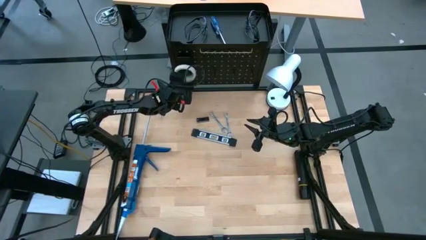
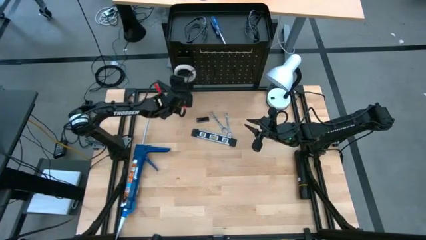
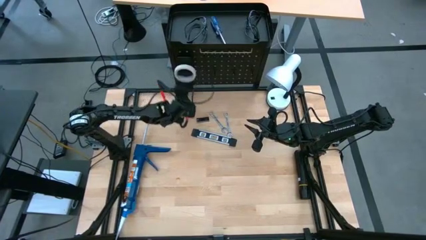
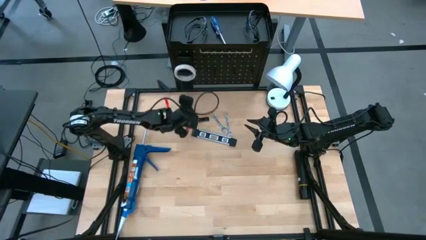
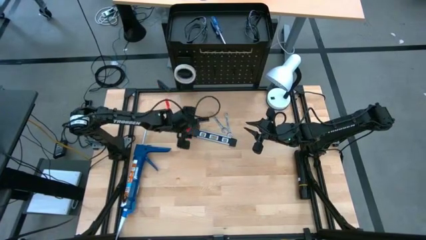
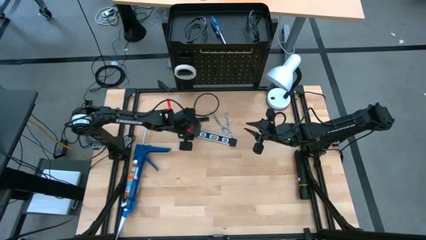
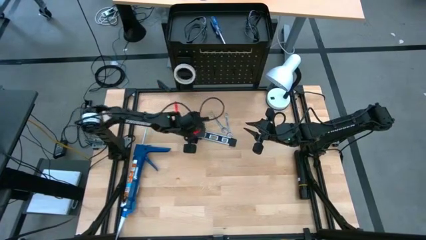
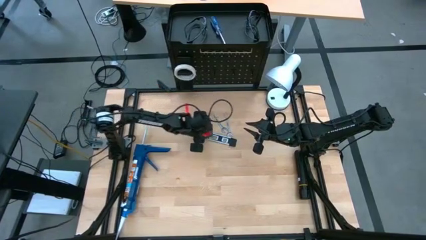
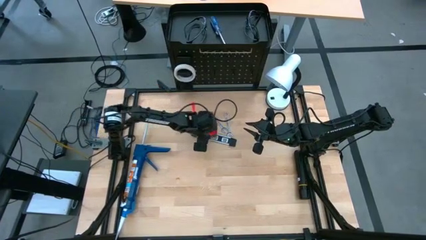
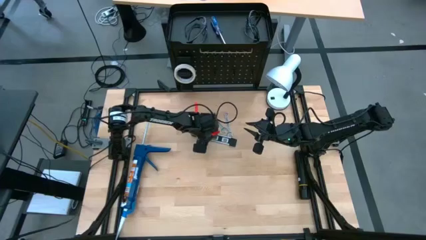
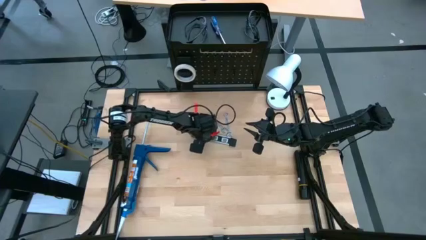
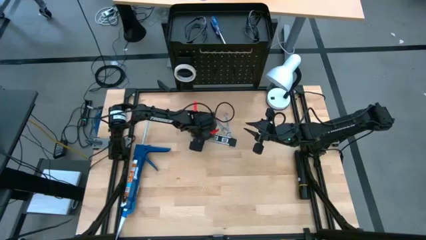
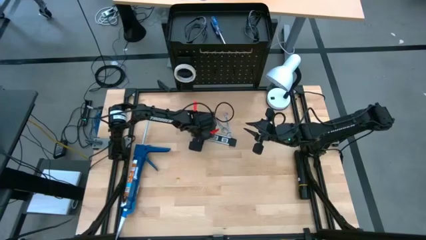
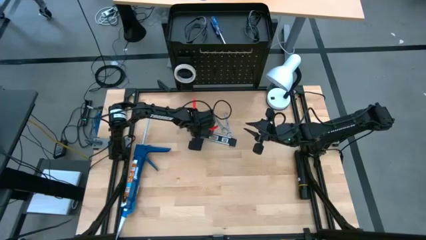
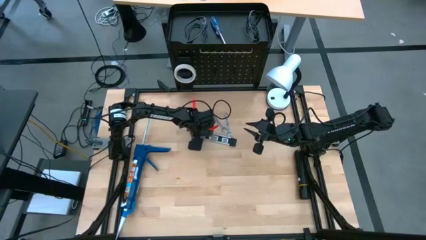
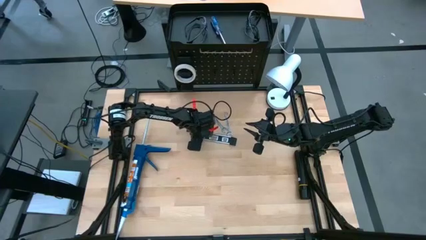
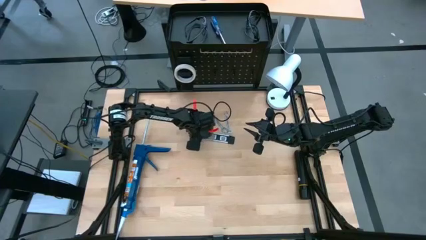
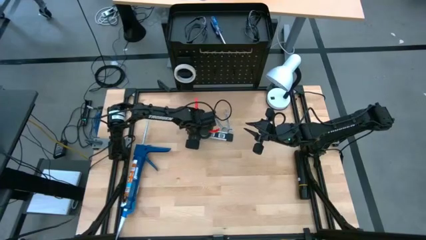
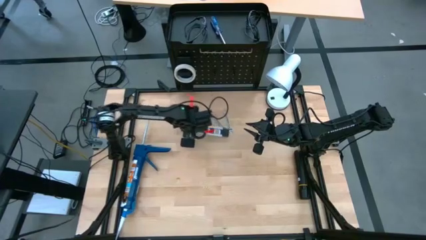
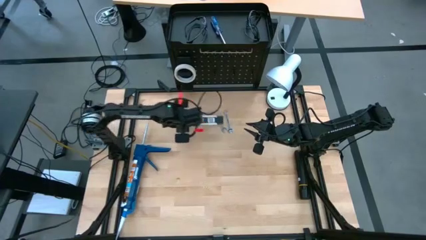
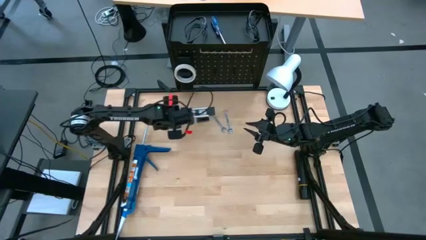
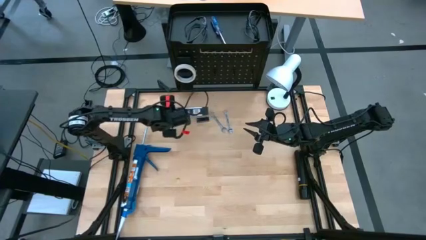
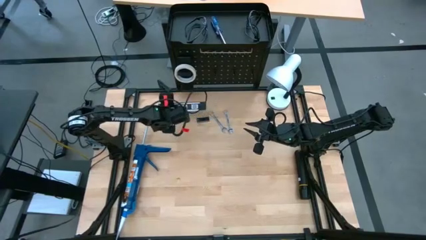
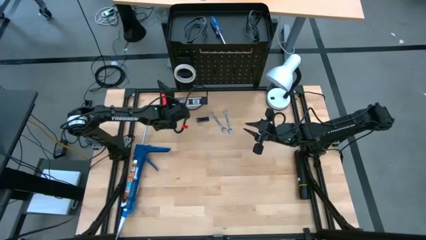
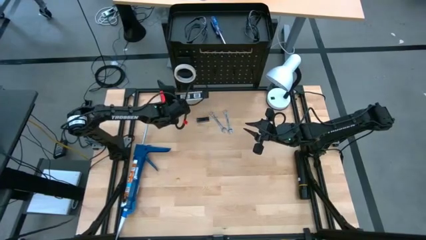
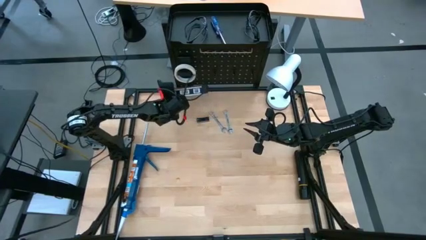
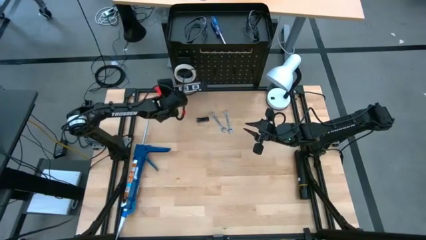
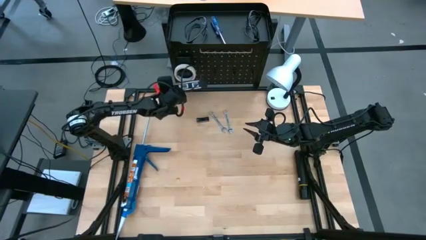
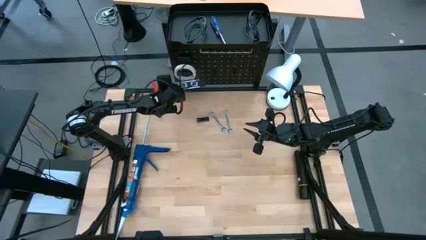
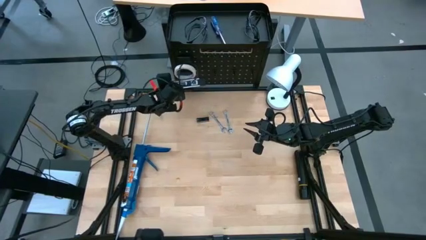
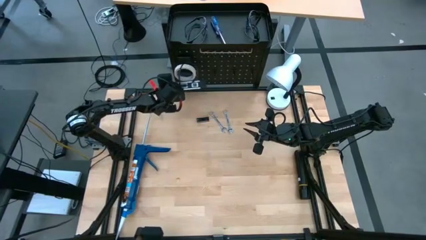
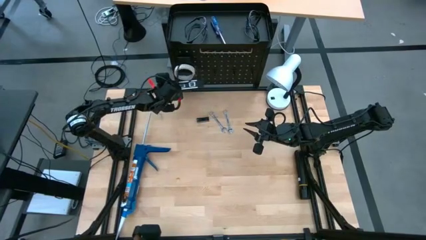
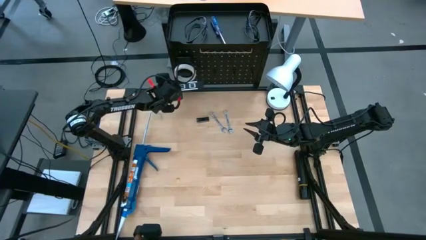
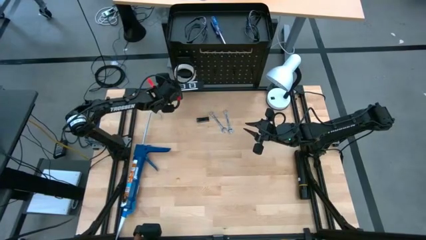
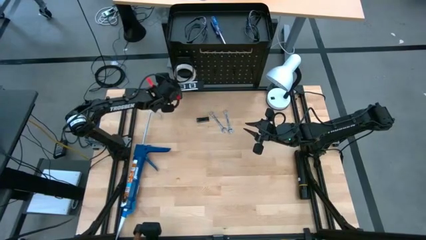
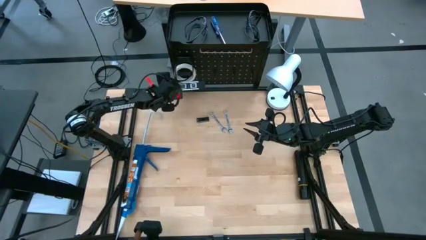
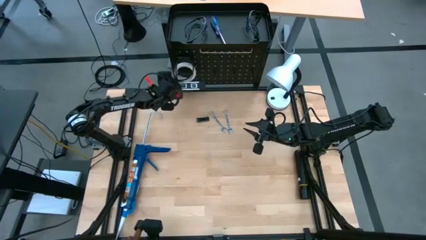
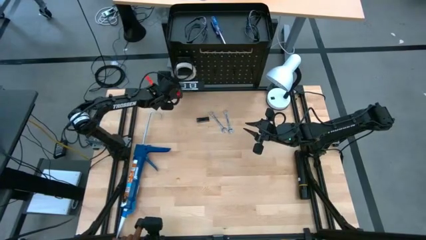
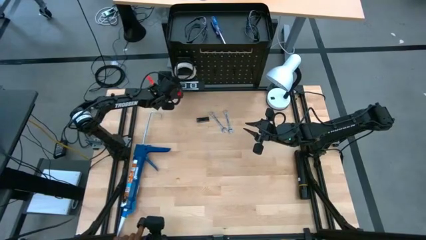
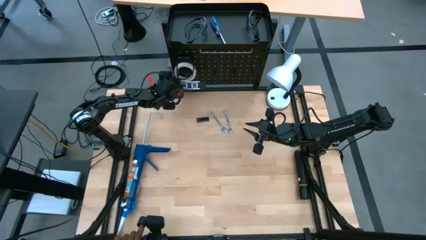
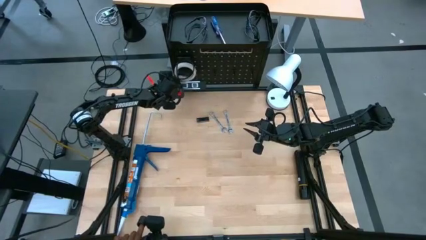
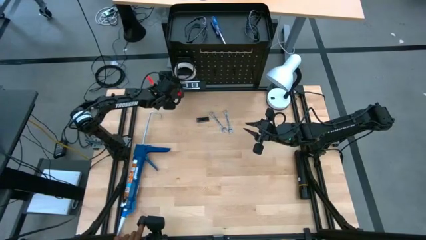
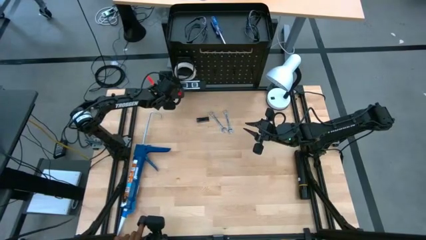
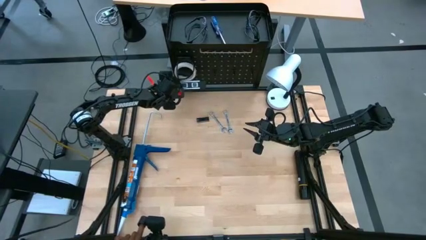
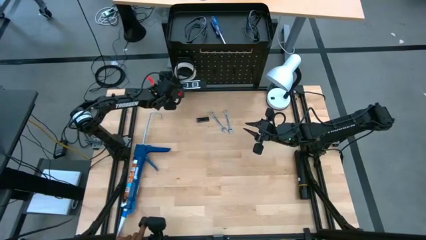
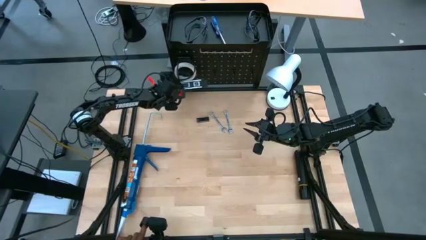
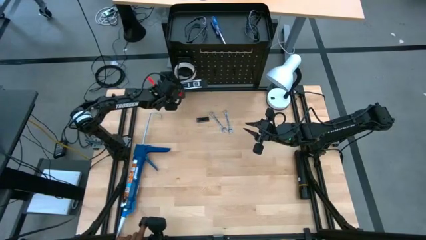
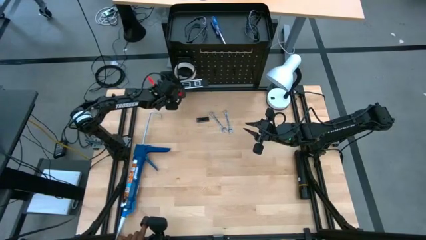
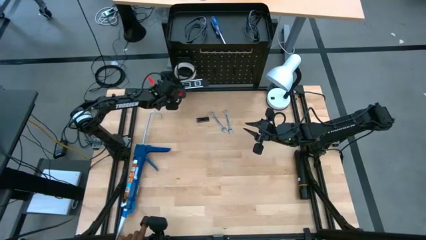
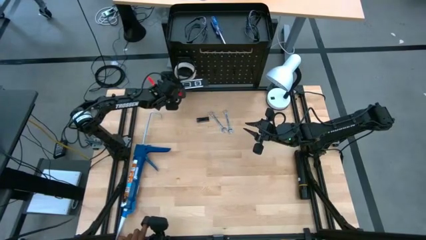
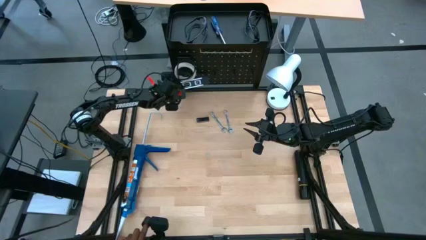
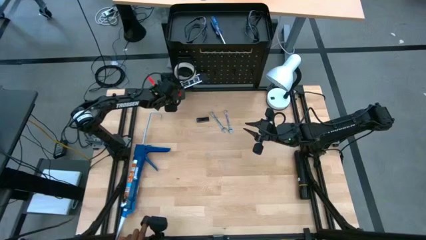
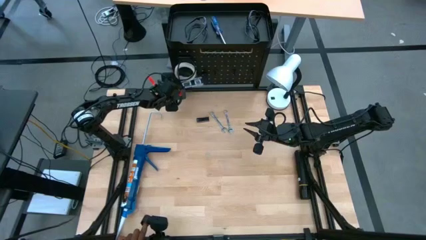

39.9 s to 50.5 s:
Task: Hang tools onto peg board
Hang the spirit level on the pegboard
